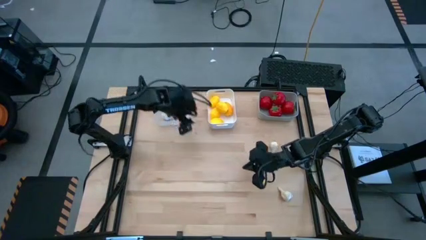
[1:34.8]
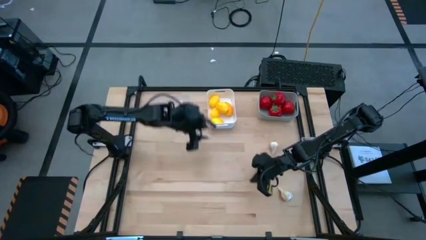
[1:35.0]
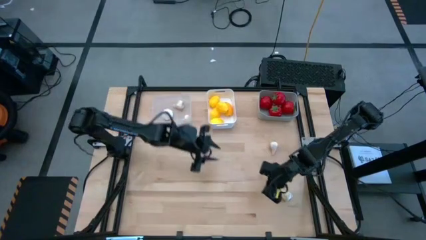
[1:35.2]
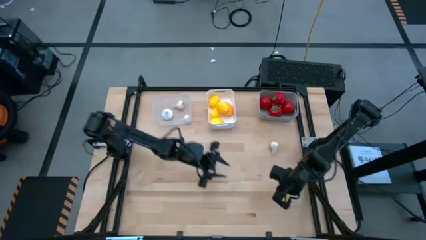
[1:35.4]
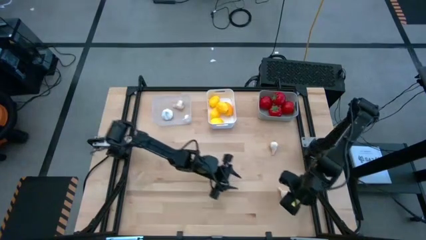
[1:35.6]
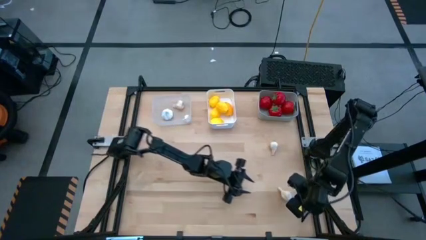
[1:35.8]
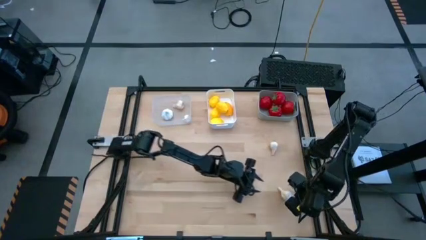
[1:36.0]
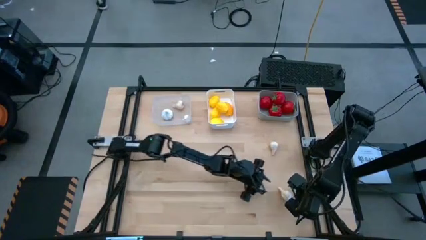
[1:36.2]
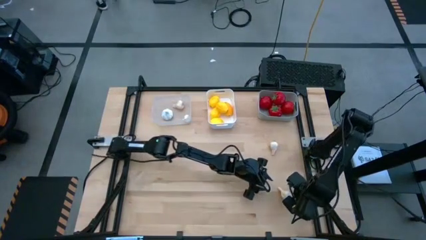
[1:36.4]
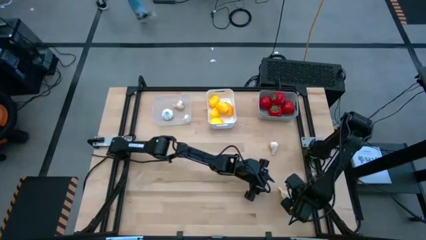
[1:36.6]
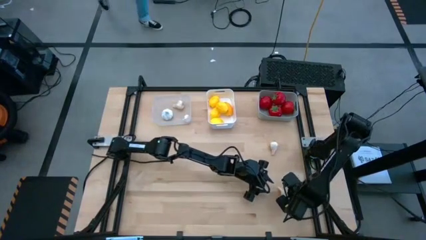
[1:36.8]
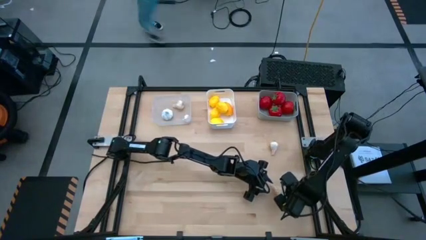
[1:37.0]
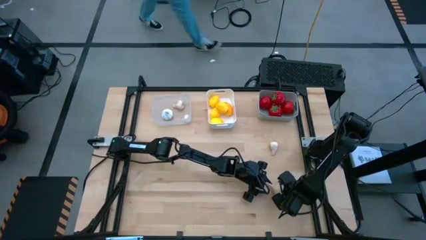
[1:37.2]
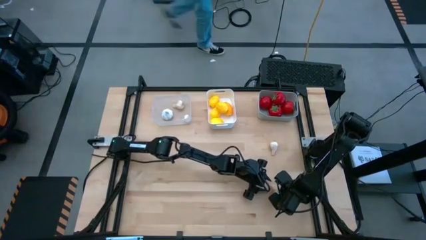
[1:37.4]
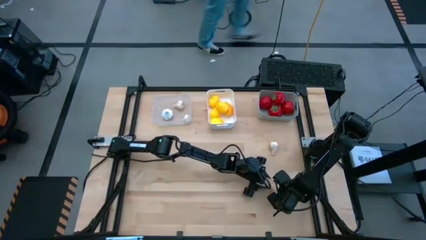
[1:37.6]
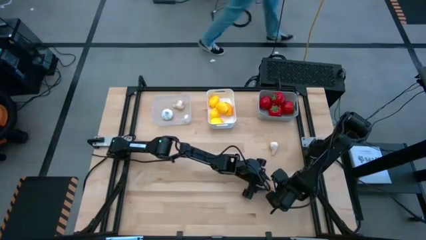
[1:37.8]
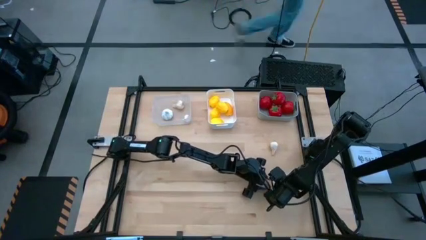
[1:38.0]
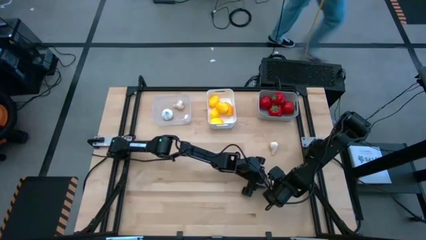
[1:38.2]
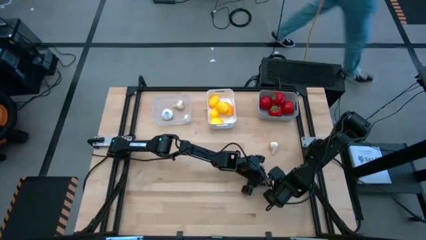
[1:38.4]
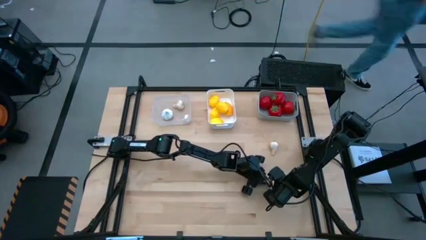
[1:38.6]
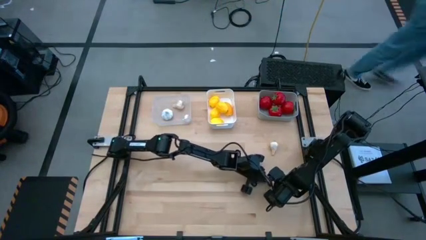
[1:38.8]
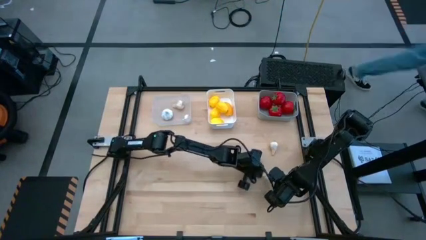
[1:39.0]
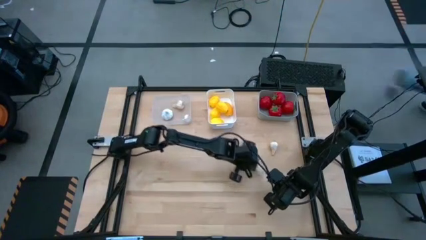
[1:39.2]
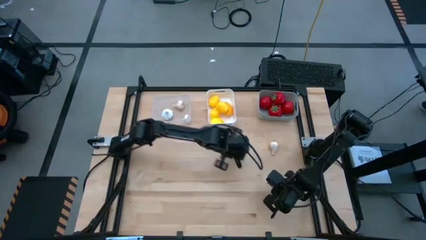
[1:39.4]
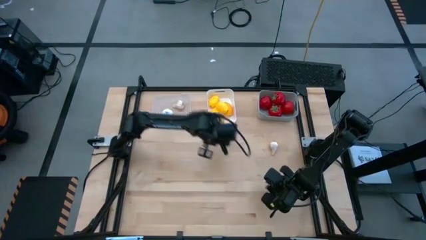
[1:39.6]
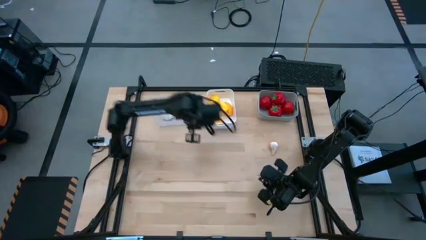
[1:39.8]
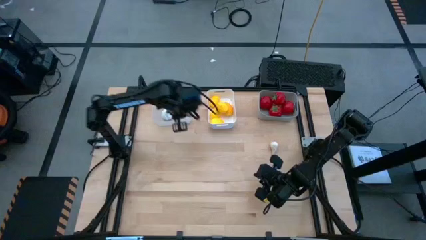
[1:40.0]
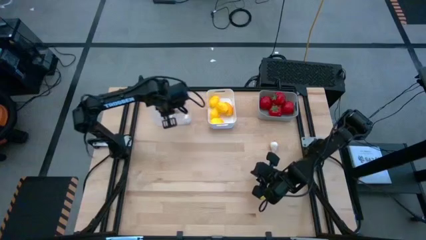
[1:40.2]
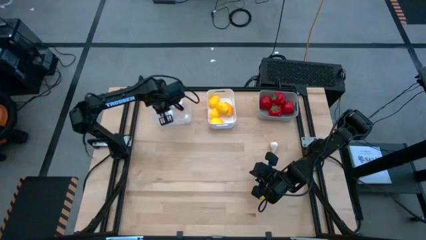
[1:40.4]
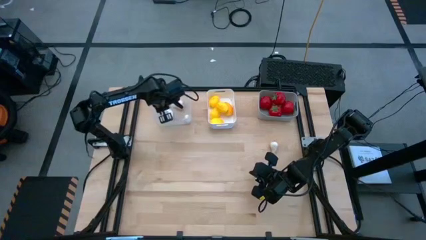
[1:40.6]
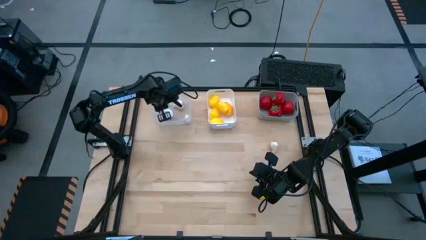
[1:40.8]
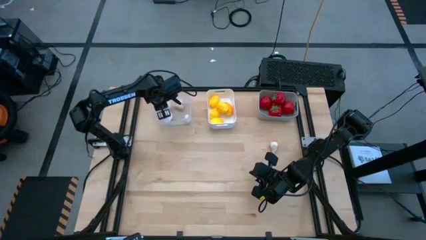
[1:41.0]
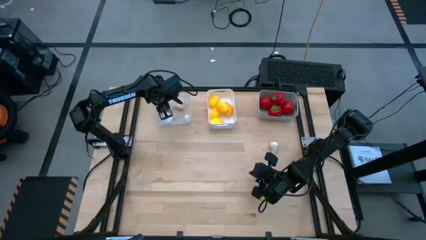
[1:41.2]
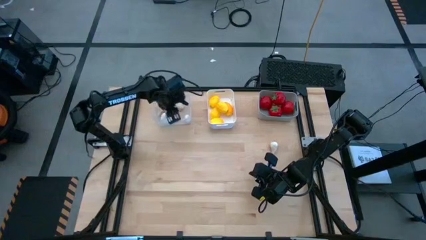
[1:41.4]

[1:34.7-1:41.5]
Task: Sort produce into baskets
Put the white garlic into the transparent bin

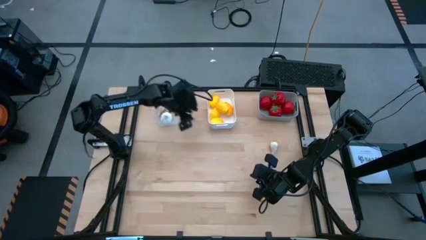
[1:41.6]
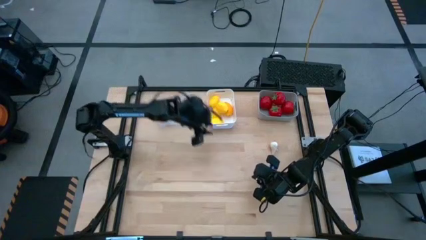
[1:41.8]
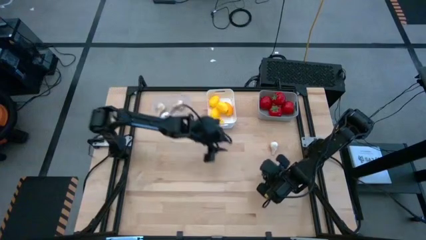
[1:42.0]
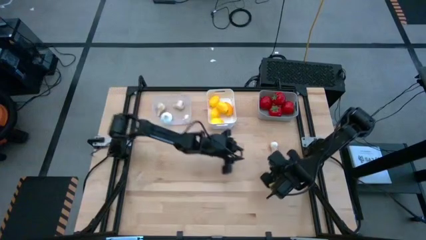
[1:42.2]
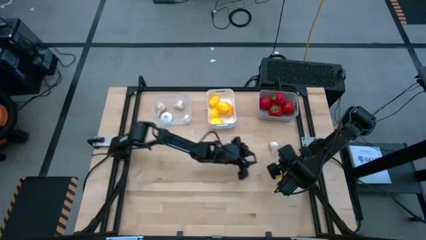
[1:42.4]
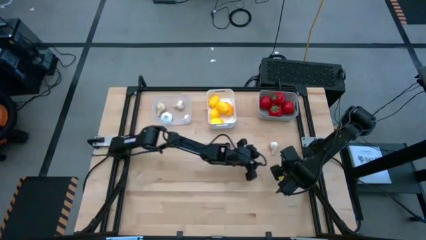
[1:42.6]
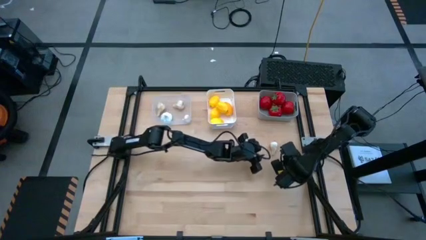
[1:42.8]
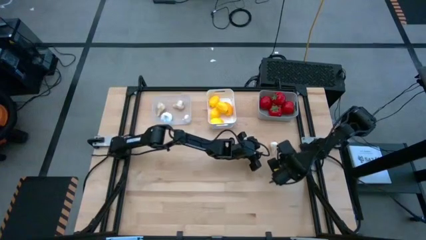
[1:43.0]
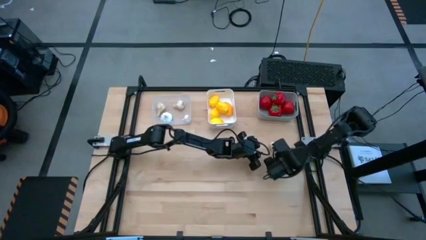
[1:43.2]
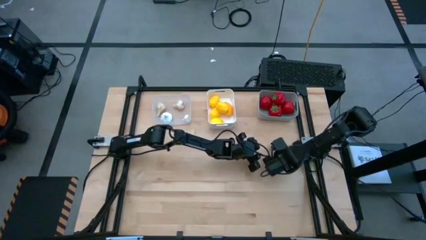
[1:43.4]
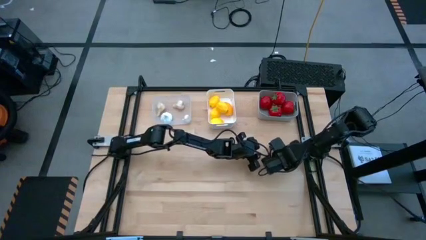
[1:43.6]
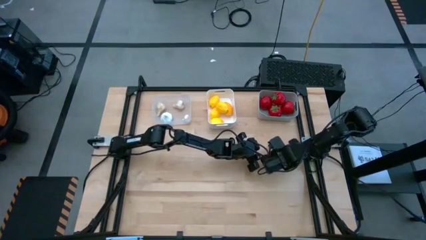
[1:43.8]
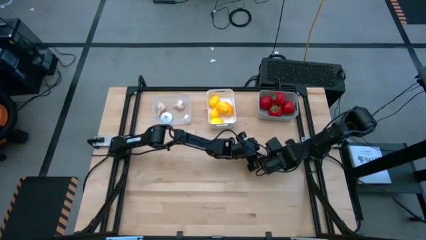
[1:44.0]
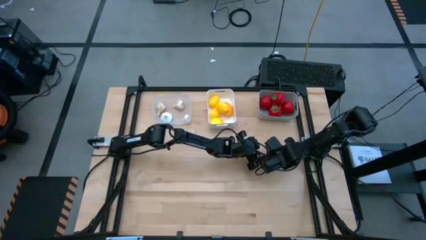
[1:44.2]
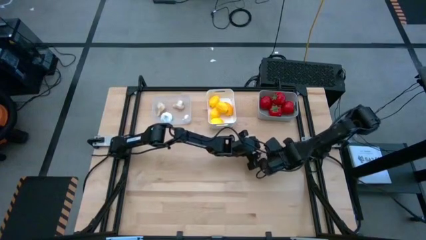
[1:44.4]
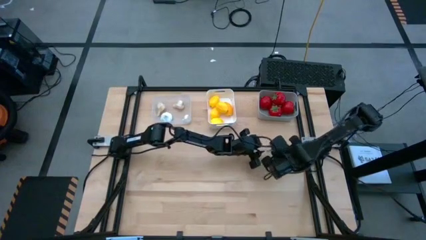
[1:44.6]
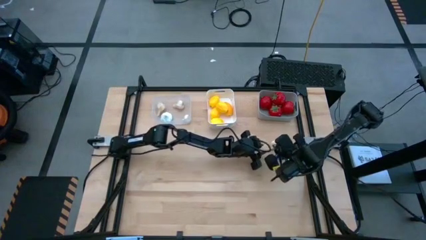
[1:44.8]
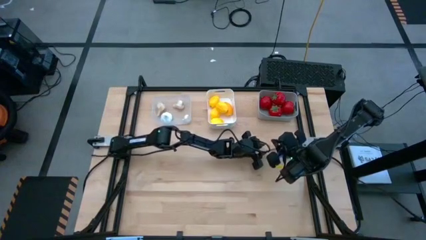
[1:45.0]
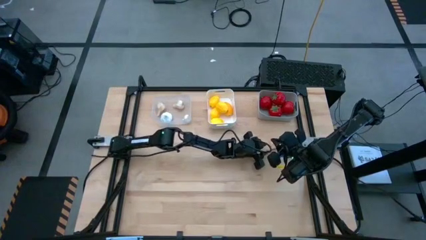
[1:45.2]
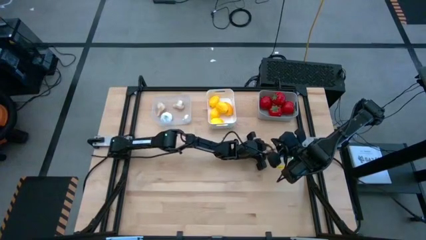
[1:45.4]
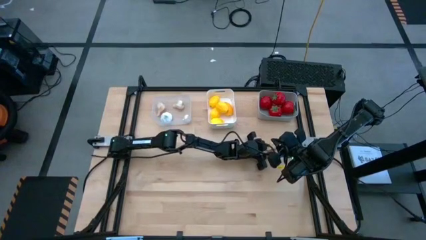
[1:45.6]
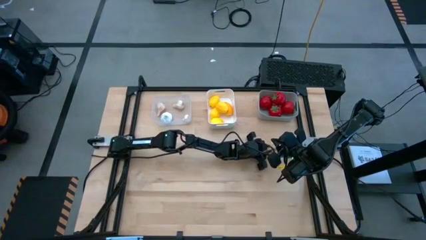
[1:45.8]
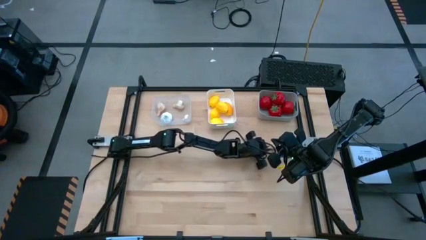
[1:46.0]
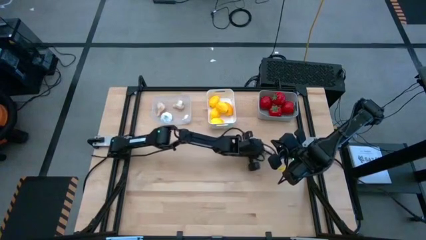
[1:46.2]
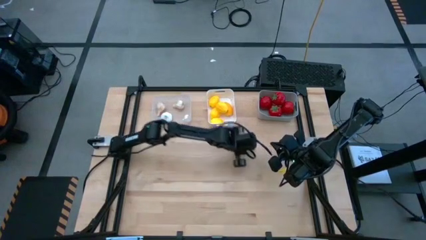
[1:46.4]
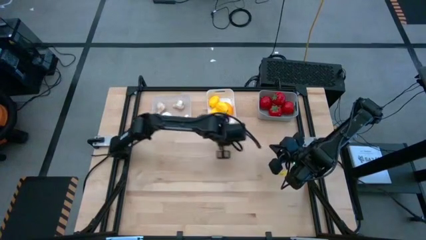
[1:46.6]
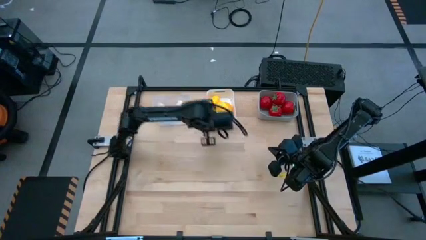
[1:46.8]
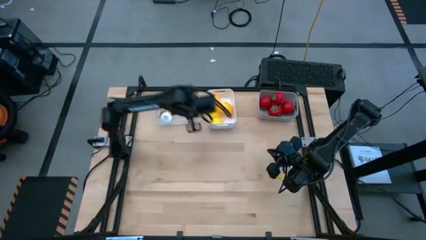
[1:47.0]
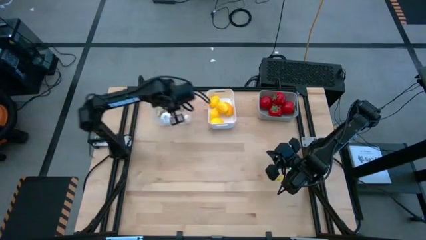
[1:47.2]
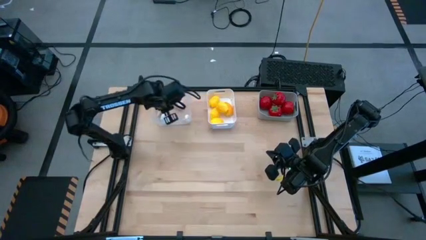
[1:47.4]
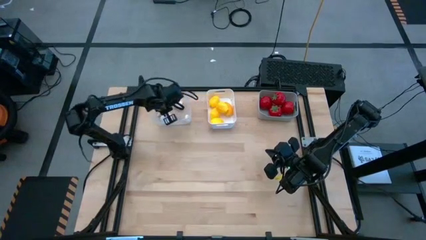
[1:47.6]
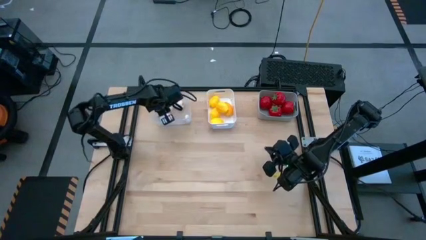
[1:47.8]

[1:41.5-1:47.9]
Put the white garlic into the transparent bin

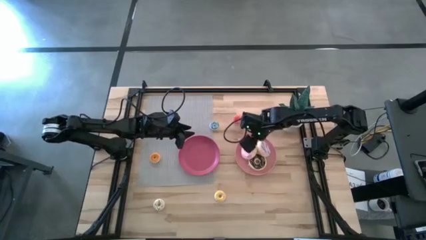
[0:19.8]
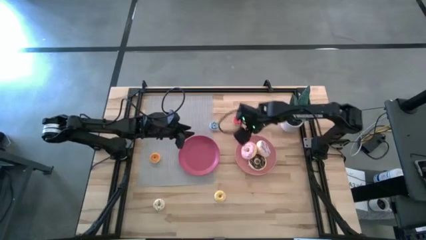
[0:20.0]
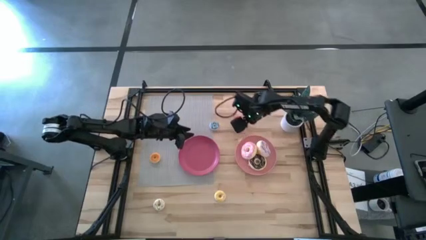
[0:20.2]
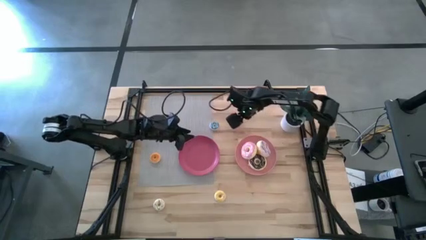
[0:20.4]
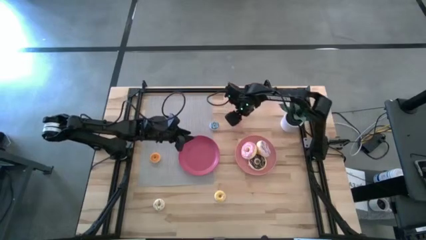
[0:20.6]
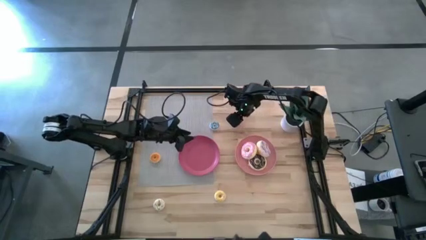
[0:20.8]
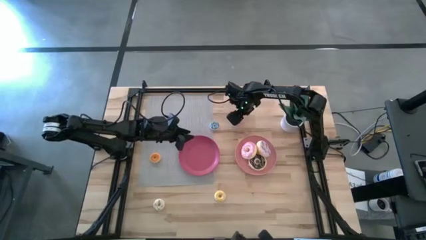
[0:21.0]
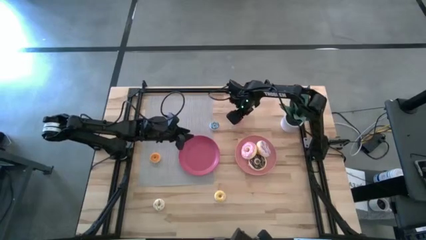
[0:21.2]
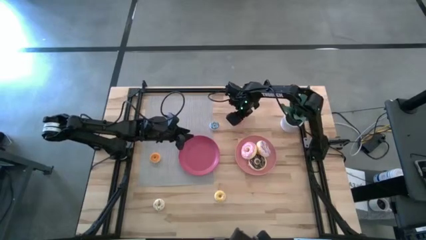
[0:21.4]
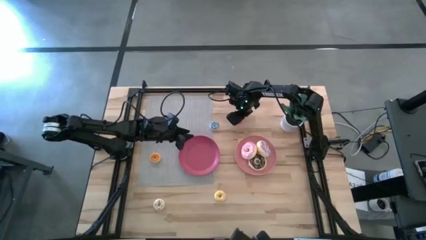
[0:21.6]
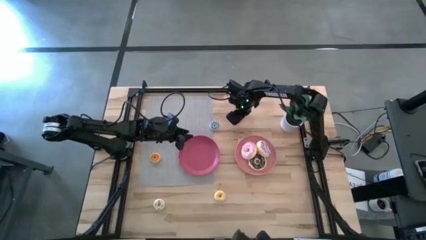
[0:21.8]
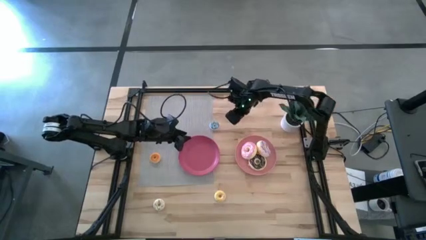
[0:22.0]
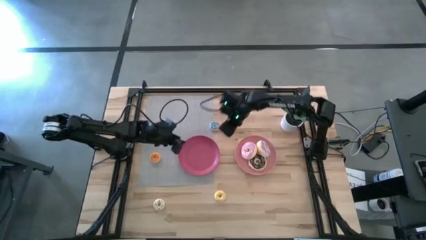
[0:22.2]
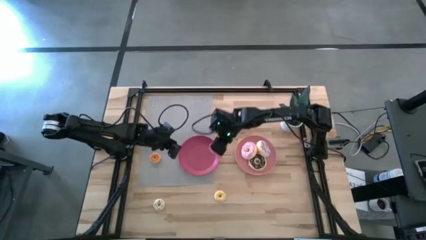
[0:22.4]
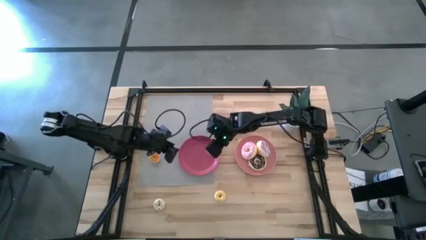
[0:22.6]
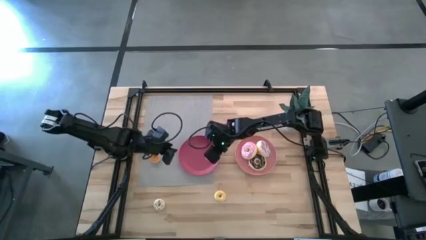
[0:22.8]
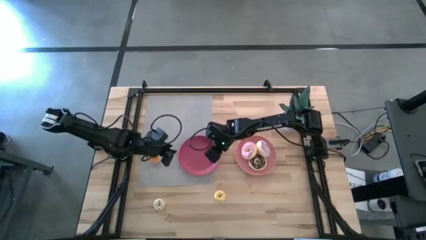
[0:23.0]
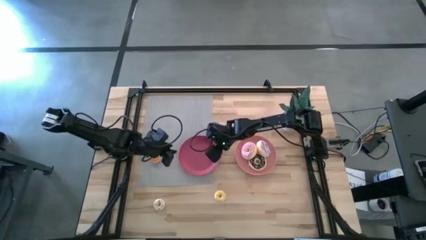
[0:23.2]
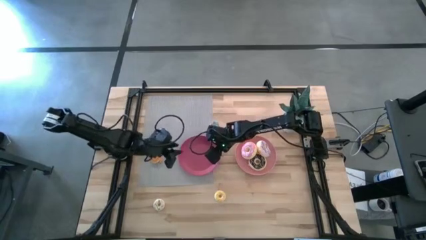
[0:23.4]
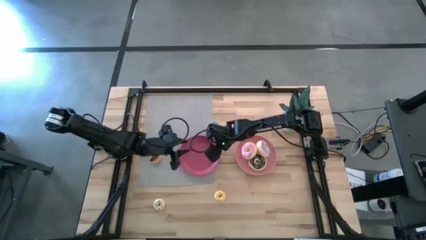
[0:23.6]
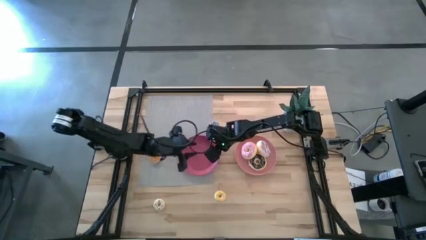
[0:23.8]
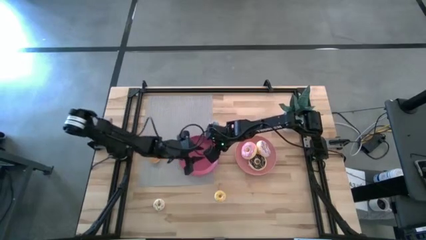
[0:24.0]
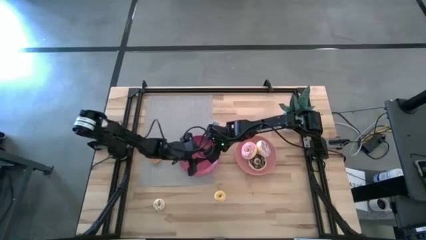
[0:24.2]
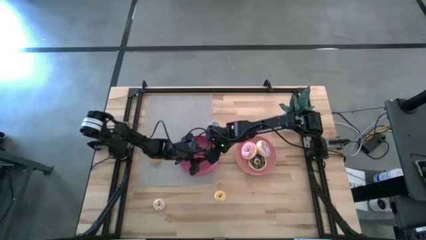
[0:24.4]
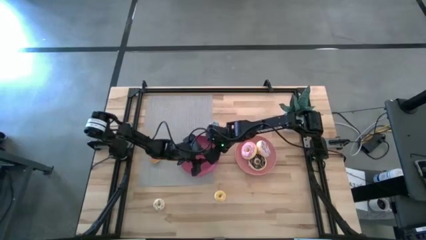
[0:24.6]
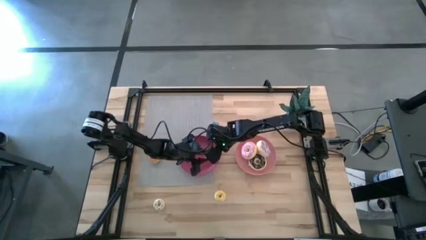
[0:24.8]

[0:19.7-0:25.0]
Task: Pick & Place donuts
Put the small red doughnut into the pink plate
